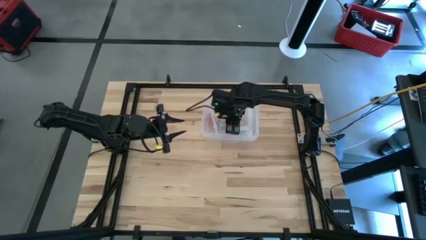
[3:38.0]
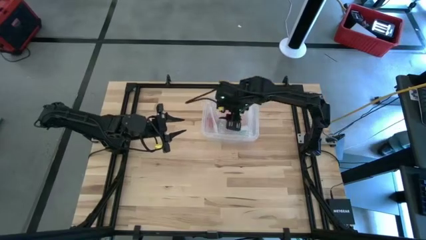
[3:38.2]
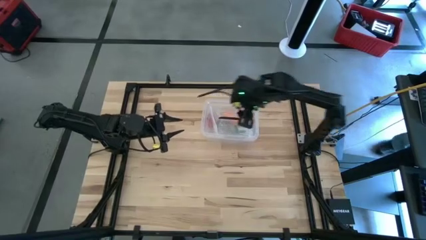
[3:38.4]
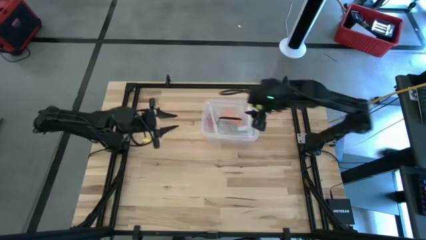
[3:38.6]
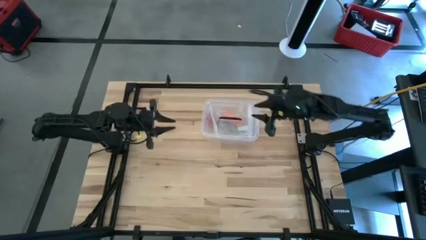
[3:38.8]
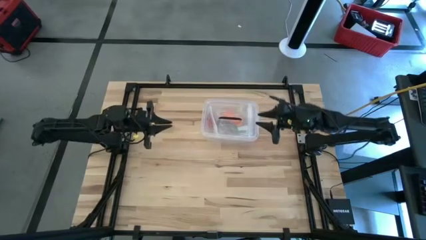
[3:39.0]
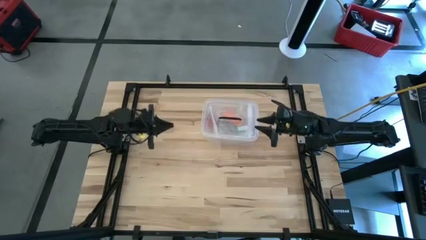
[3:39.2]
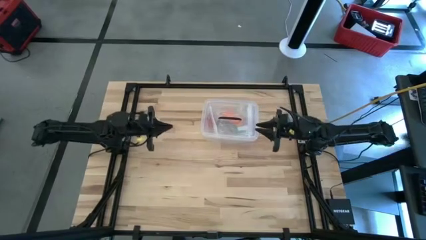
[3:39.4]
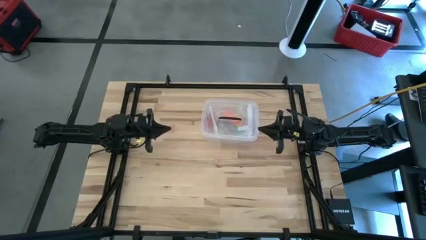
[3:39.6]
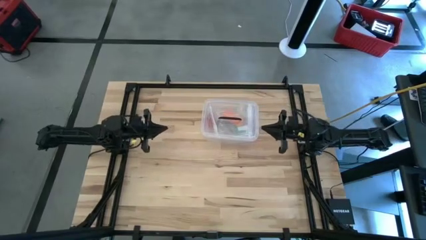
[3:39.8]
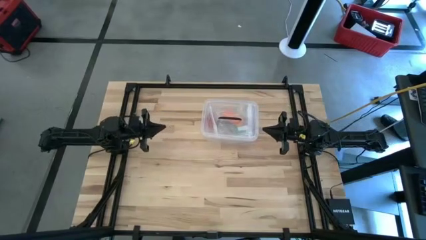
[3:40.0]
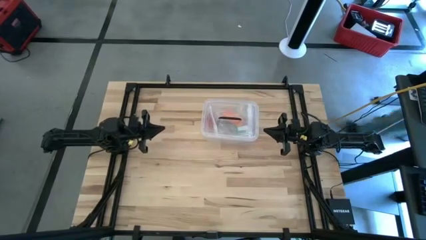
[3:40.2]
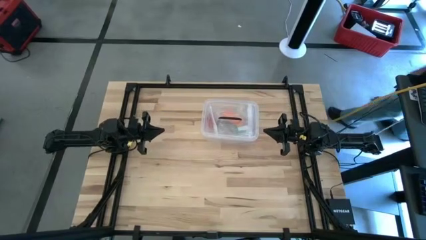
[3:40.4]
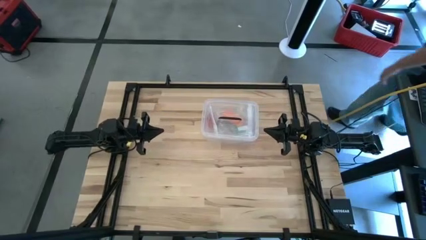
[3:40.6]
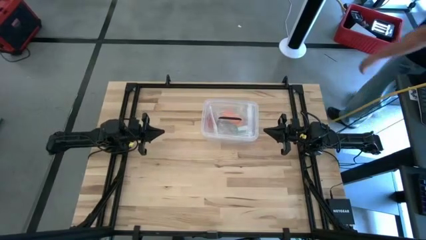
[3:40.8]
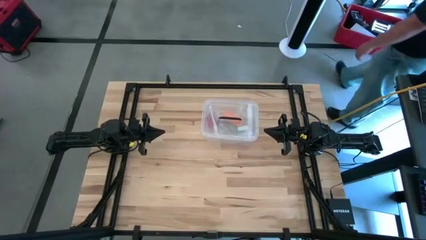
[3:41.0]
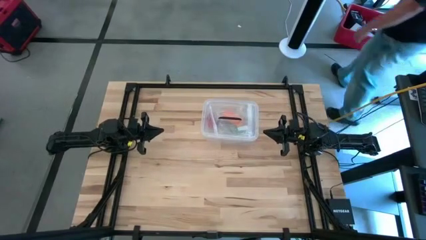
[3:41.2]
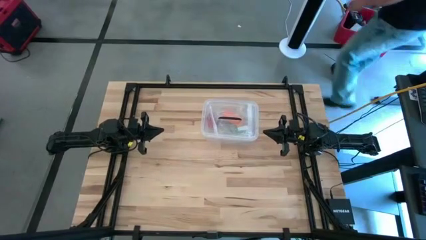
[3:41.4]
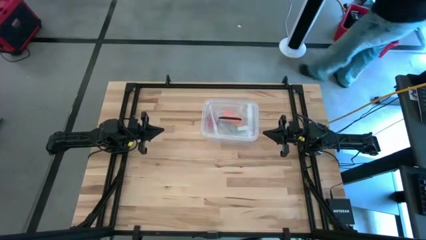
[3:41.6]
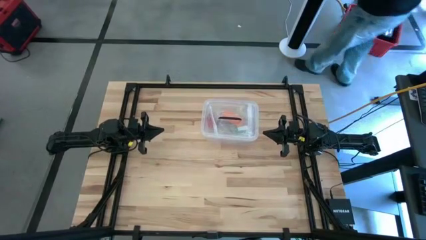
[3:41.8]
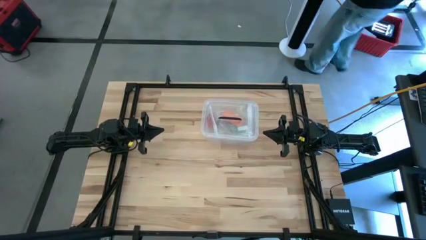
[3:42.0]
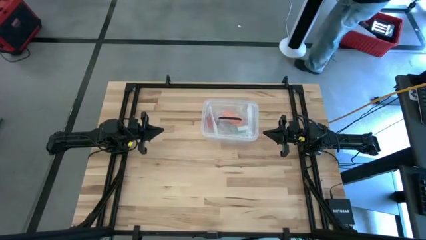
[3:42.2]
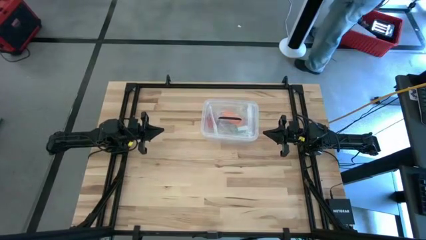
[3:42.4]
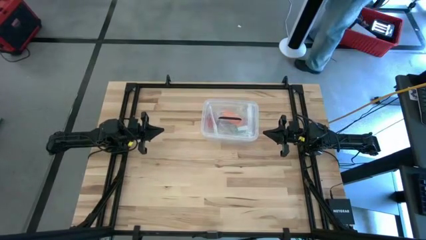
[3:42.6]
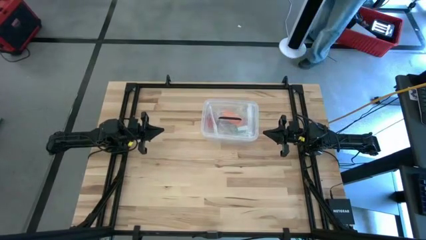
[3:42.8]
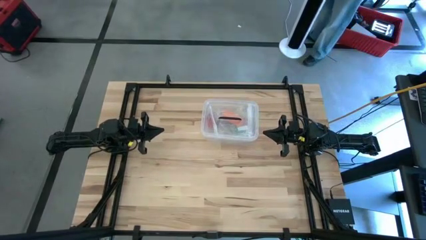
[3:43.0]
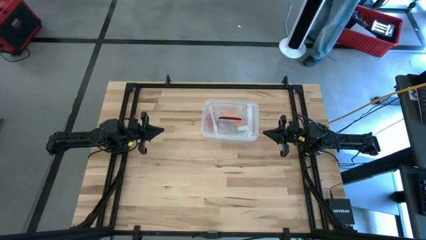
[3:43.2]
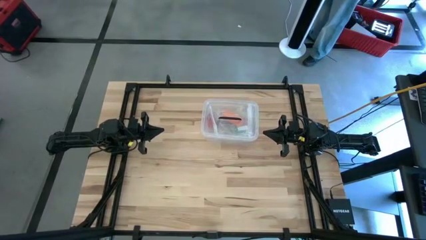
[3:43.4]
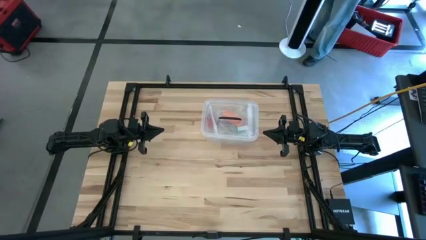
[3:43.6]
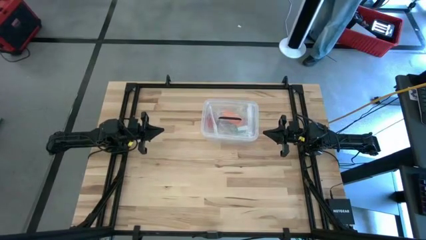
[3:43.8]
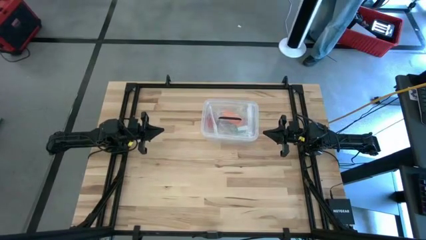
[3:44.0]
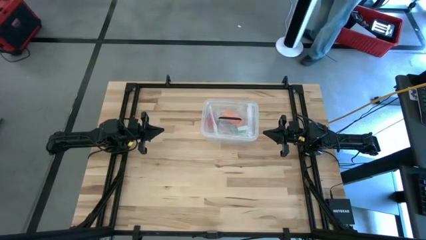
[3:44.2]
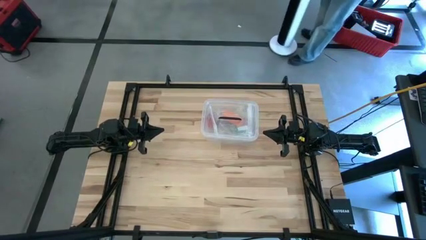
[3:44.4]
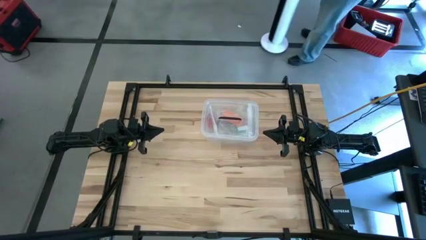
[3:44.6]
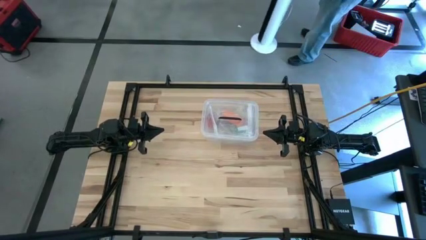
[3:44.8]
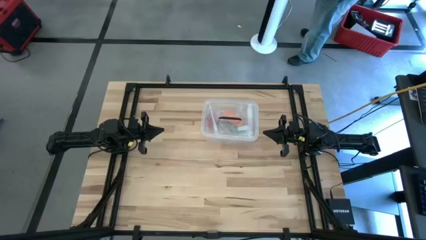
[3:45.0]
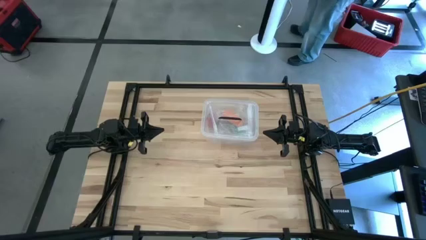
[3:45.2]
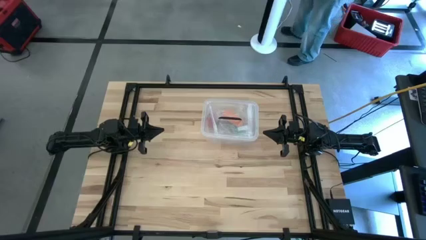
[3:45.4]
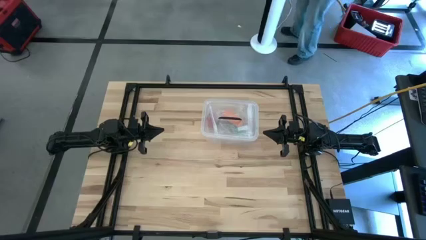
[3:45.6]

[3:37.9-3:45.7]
Task: Roll bandage
Return to Home Position

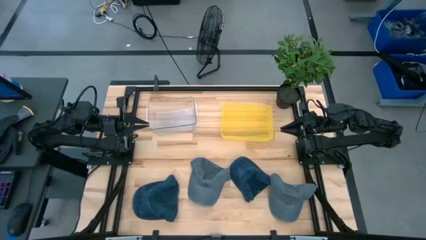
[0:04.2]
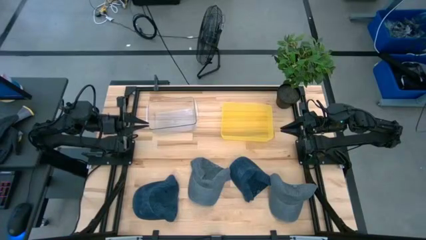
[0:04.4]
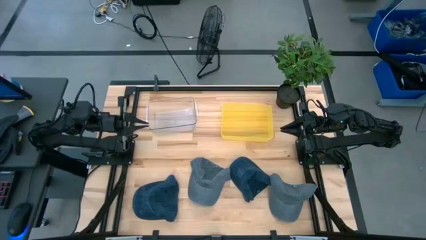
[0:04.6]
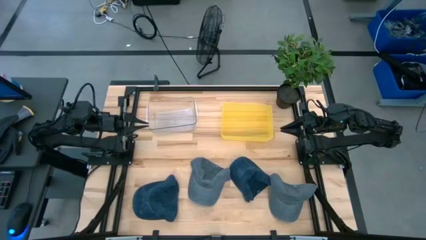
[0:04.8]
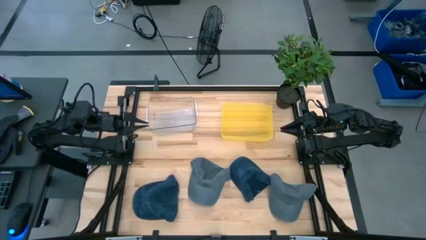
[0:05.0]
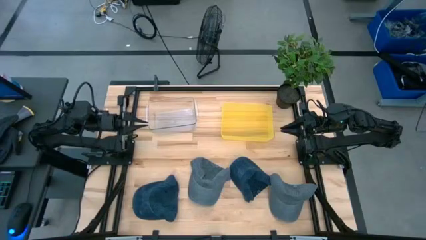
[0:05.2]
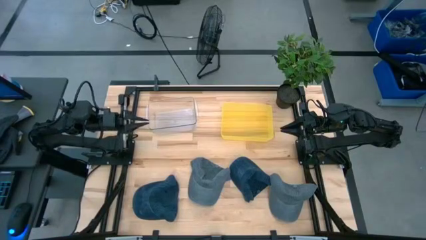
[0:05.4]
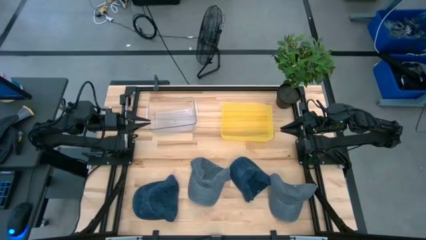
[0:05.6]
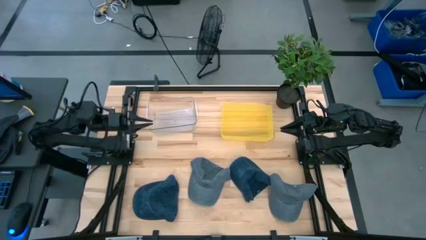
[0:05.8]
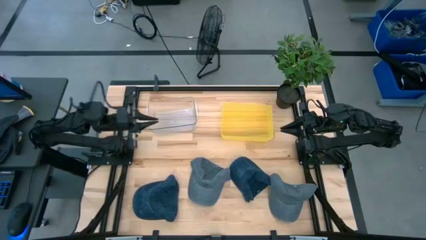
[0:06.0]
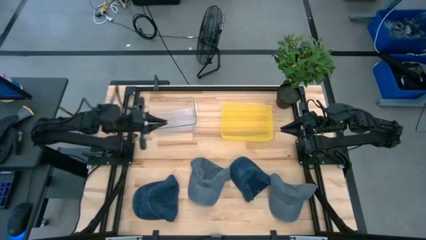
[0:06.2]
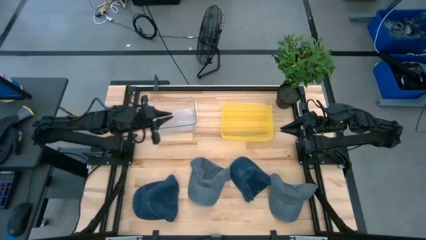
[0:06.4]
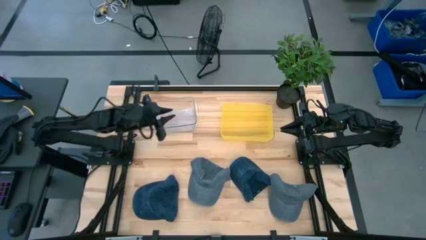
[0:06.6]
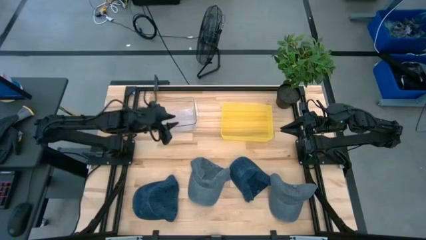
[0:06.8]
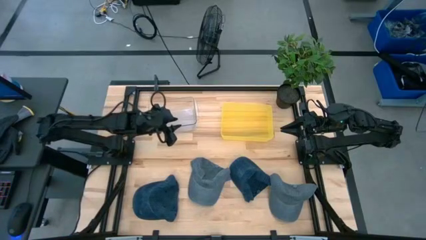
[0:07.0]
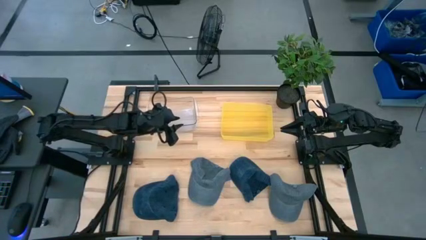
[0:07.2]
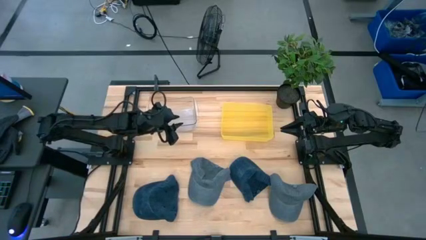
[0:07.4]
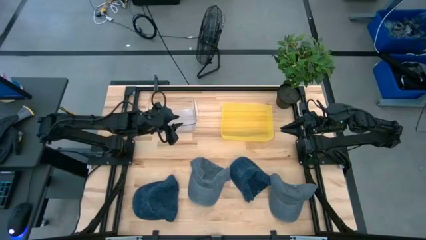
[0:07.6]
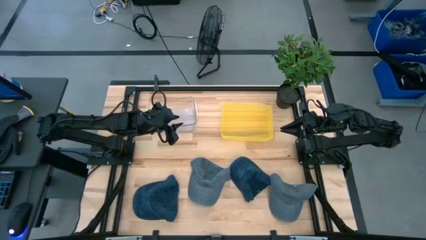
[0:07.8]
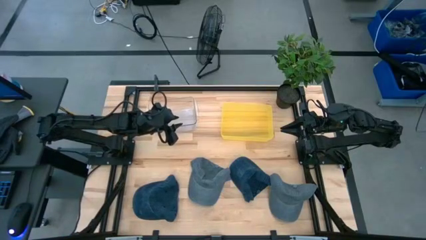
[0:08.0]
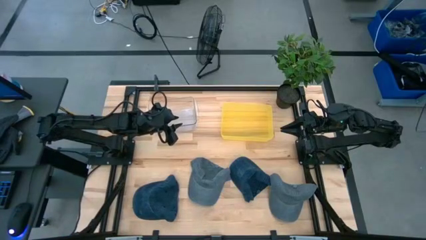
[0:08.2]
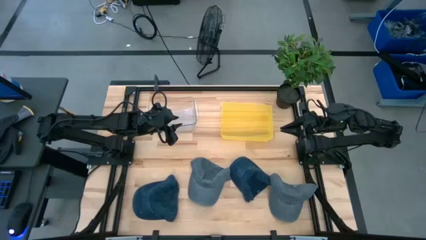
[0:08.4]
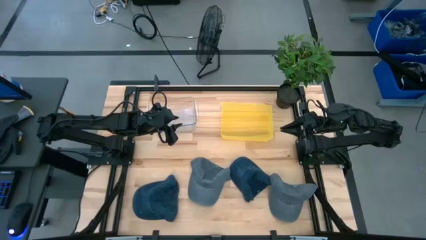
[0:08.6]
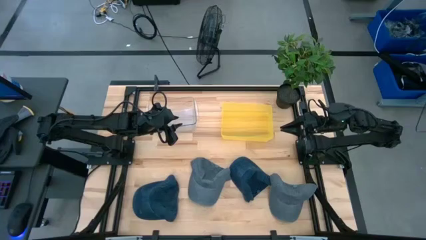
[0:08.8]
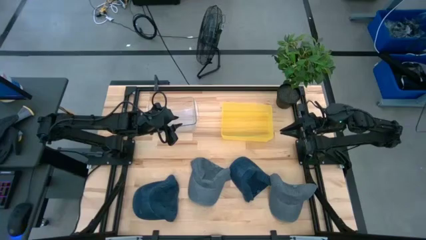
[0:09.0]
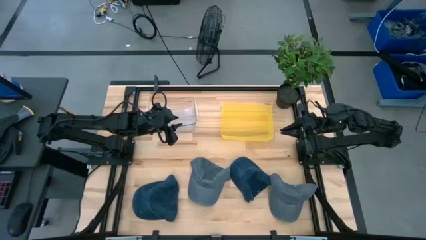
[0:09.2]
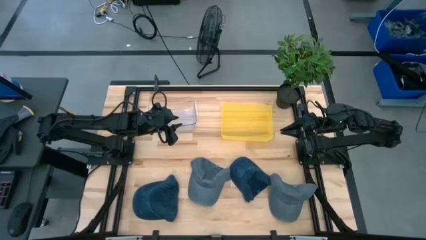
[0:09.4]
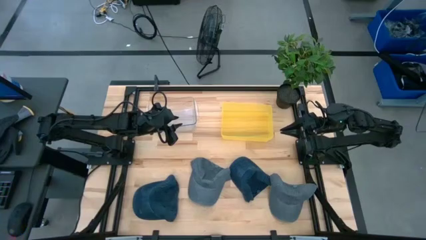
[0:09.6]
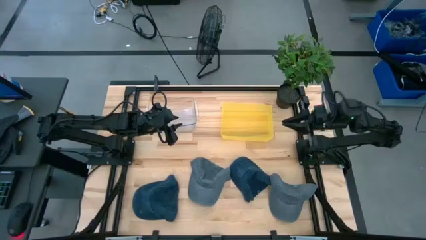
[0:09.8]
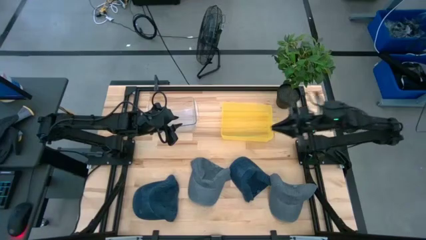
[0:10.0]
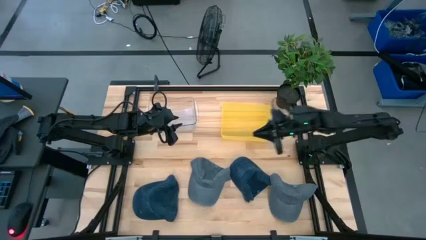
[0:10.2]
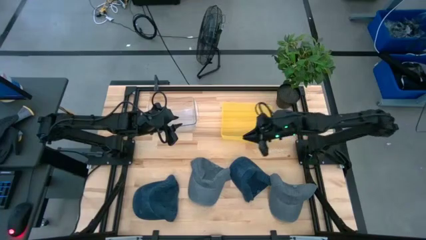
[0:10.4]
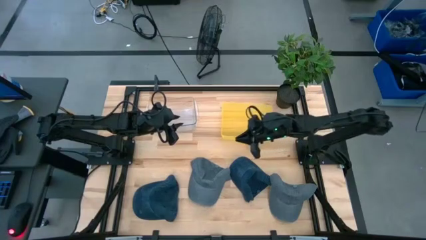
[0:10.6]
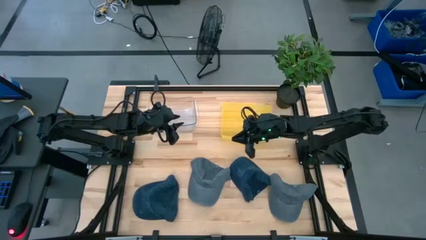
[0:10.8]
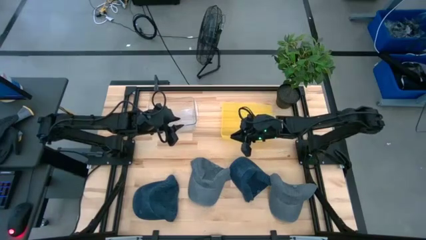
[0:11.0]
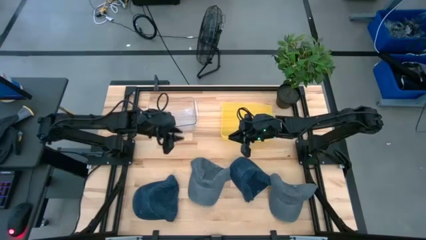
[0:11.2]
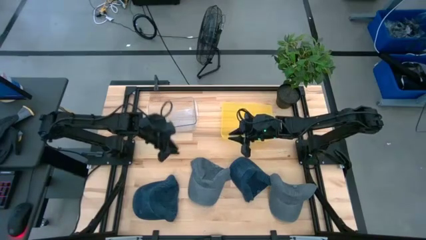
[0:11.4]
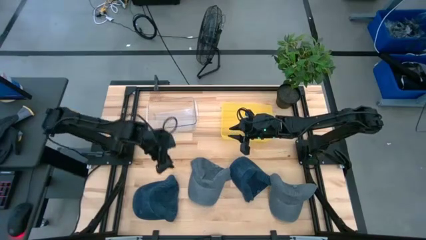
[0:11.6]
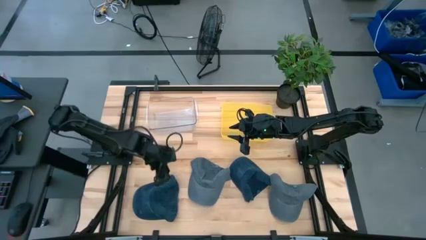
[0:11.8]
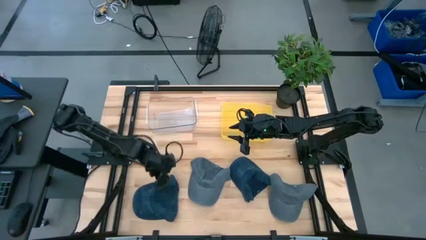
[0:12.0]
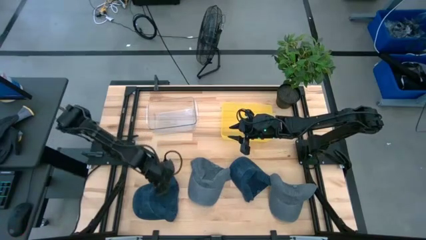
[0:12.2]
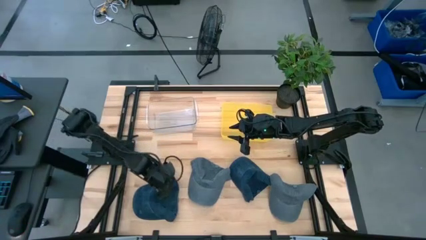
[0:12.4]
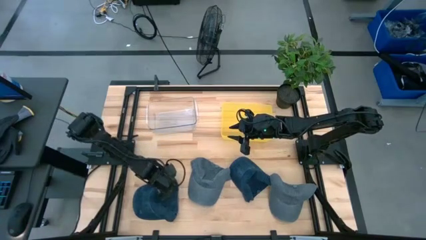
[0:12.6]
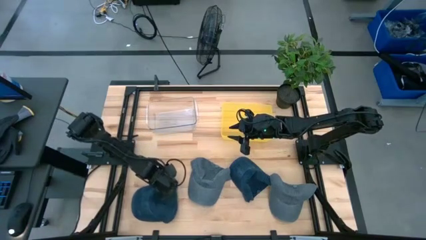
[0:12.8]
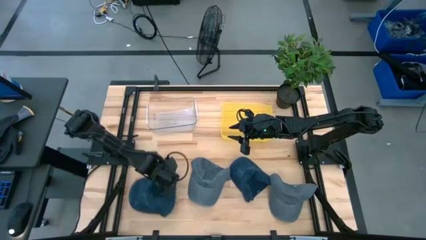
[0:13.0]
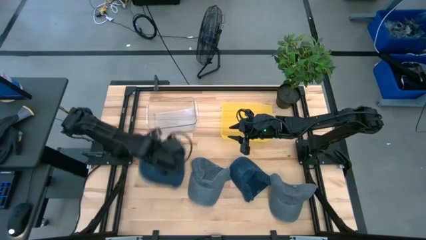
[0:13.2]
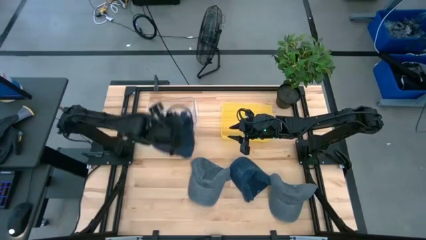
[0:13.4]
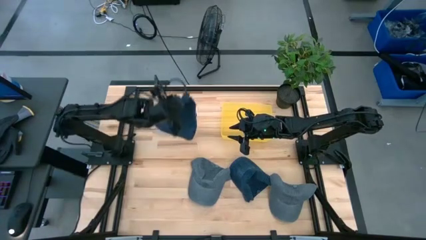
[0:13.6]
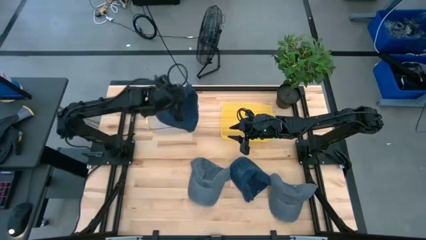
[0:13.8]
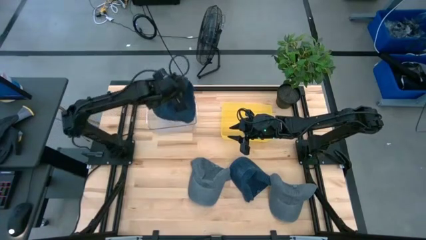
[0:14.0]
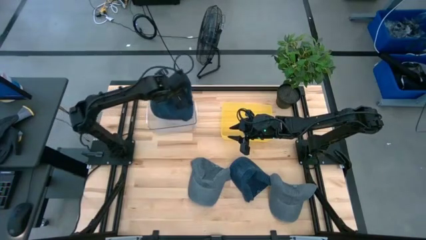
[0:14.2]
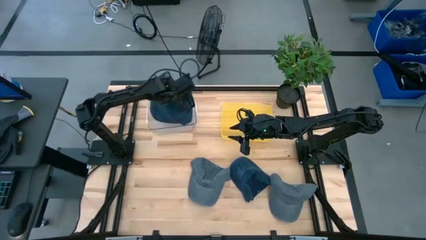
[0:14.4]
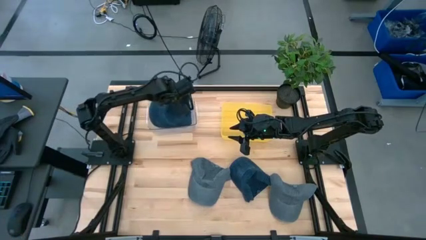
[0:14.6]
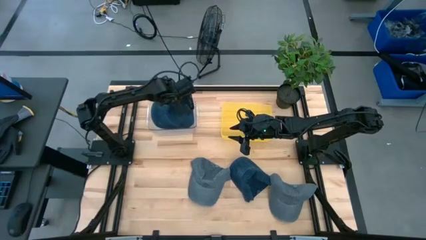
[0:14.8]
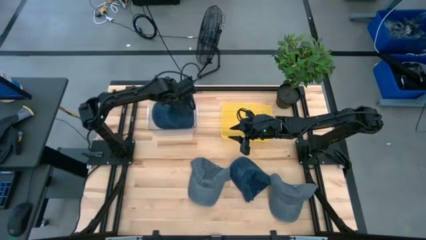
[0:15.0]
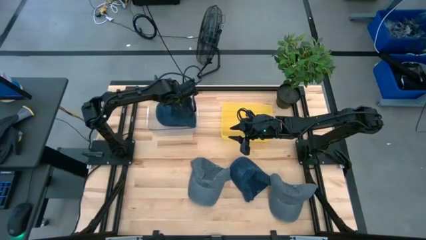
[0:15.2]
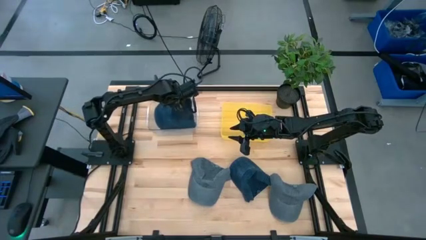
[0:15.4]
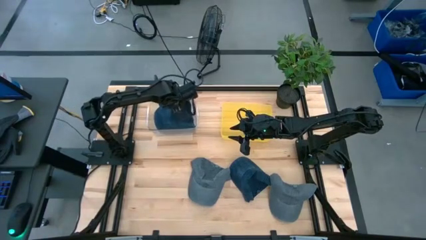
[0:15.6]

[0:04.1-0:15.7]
Task: Pick & Place hat
Put the left blue cap into the transparent bin
